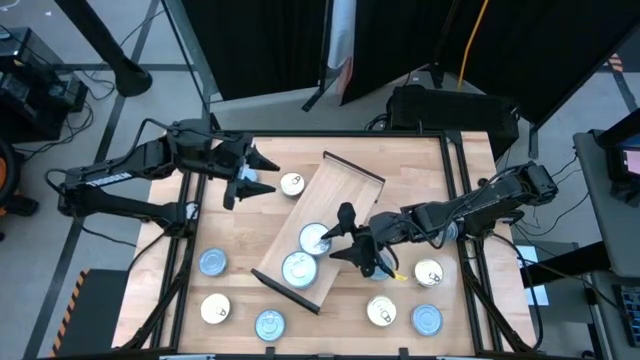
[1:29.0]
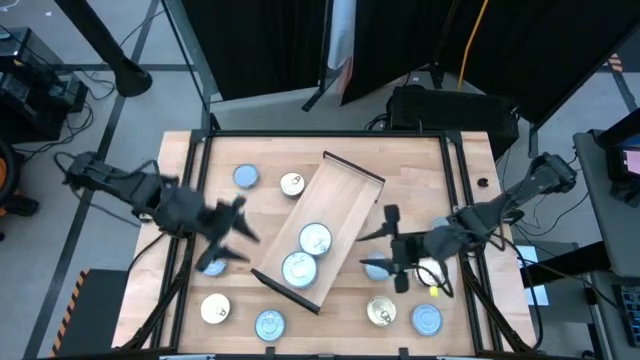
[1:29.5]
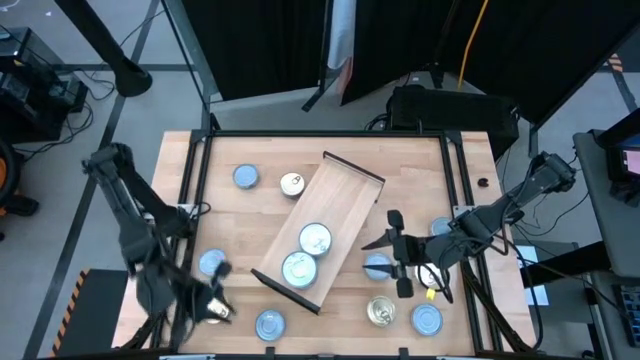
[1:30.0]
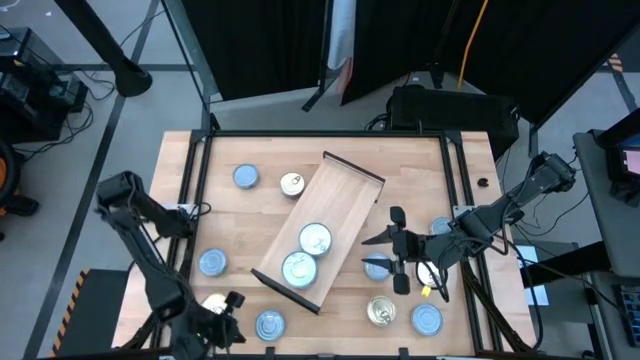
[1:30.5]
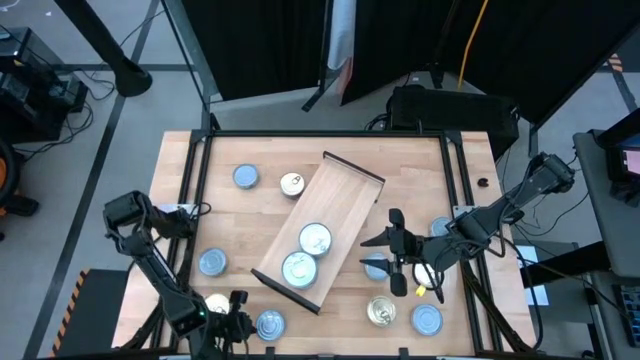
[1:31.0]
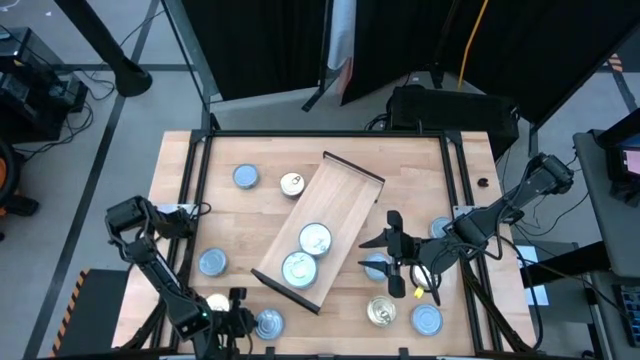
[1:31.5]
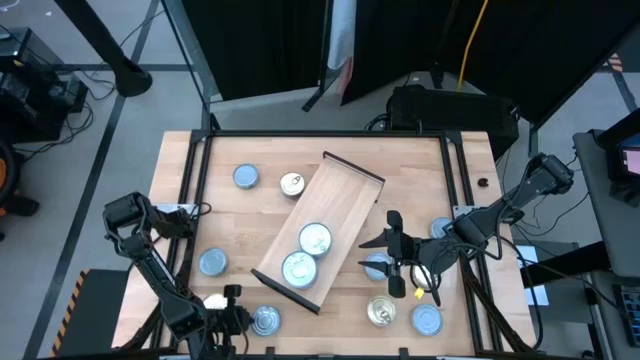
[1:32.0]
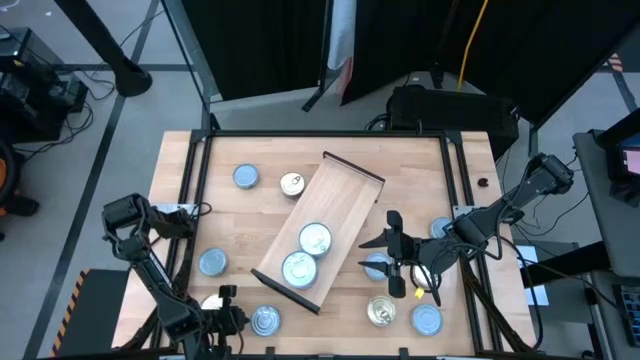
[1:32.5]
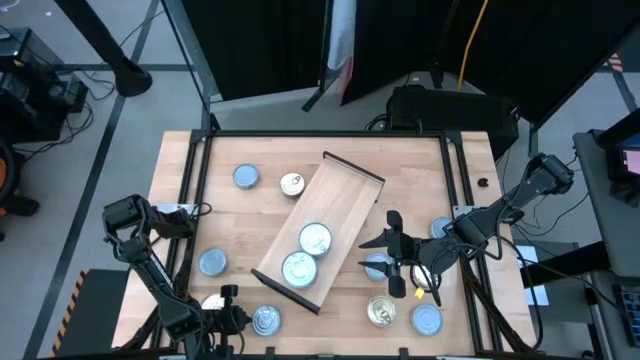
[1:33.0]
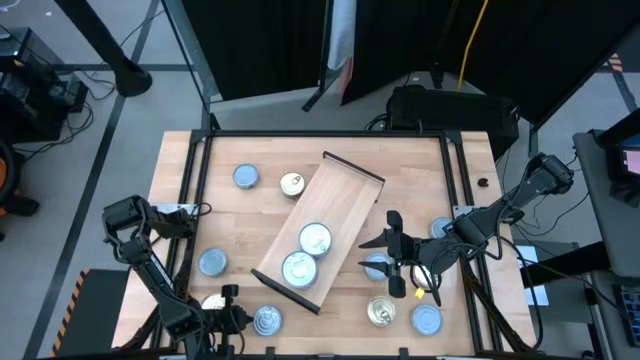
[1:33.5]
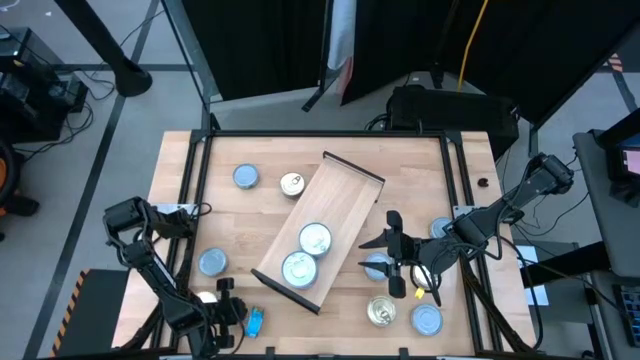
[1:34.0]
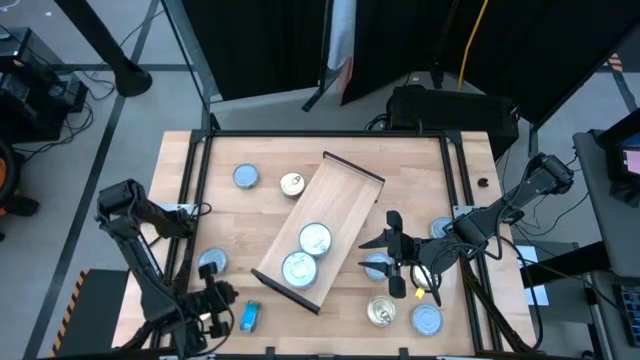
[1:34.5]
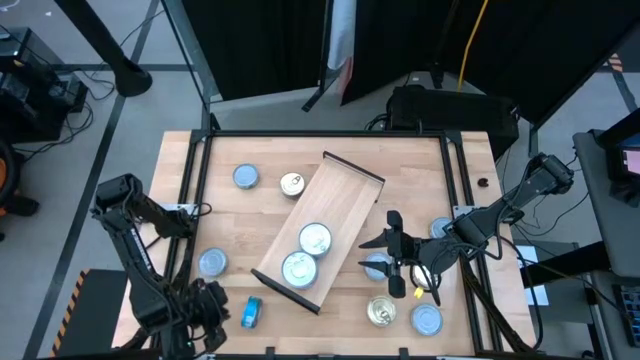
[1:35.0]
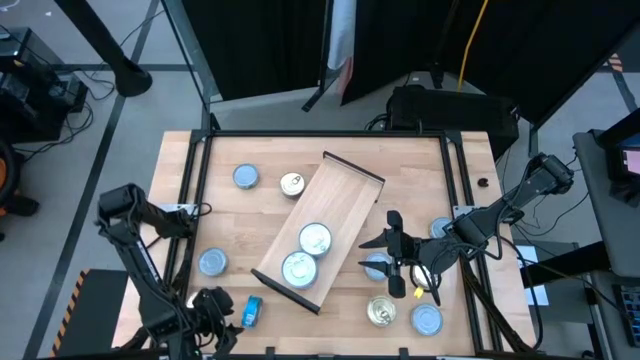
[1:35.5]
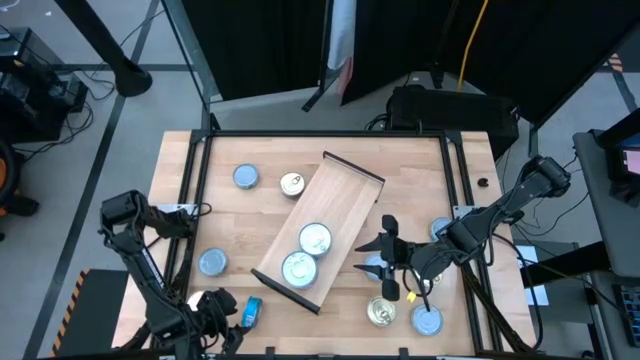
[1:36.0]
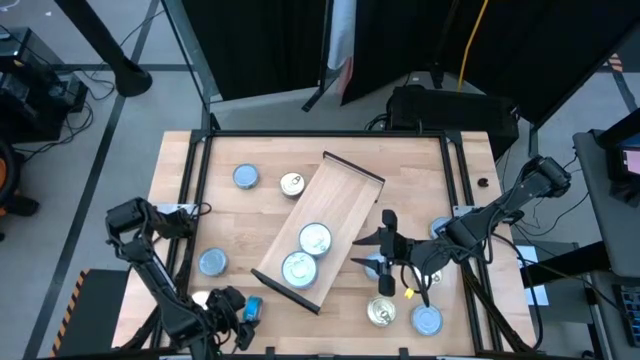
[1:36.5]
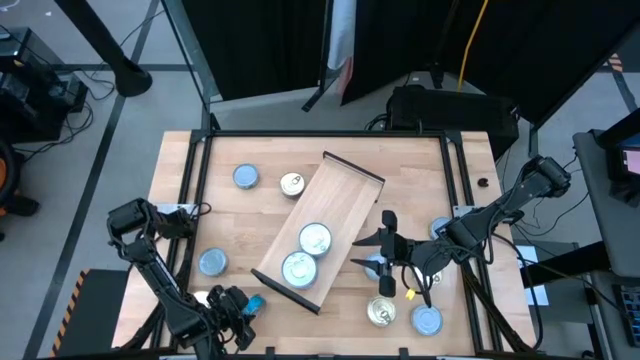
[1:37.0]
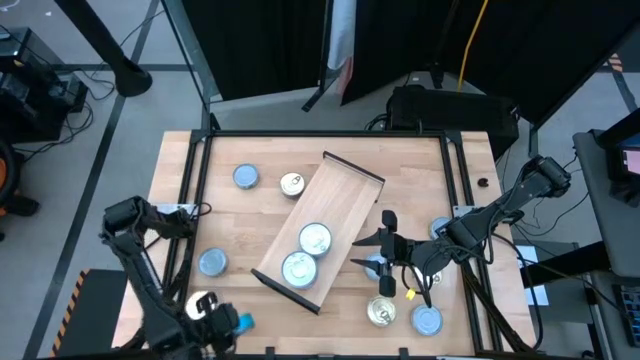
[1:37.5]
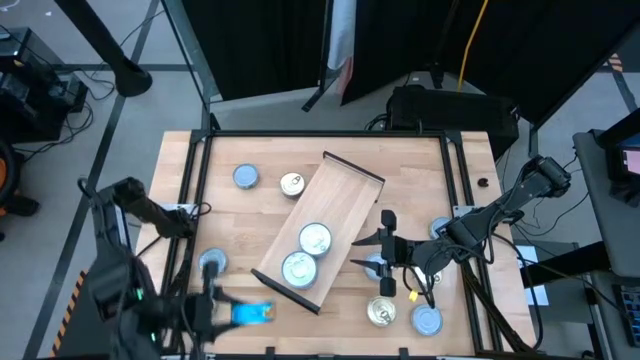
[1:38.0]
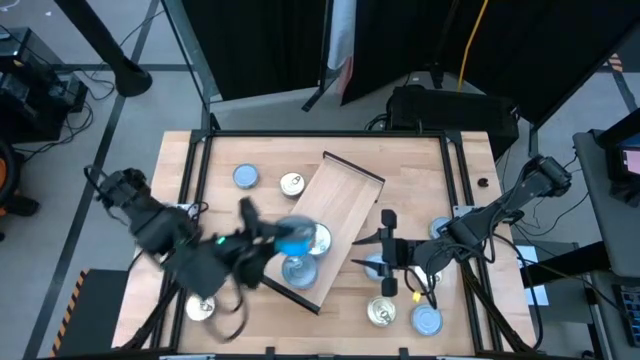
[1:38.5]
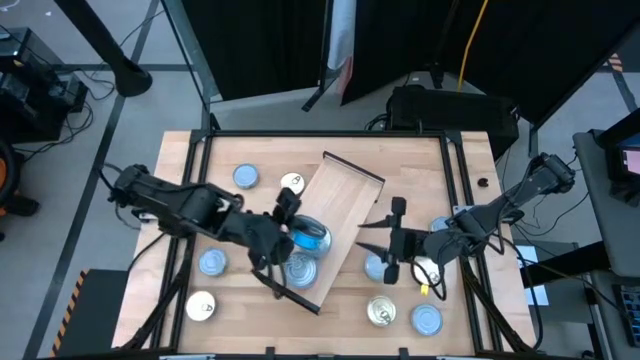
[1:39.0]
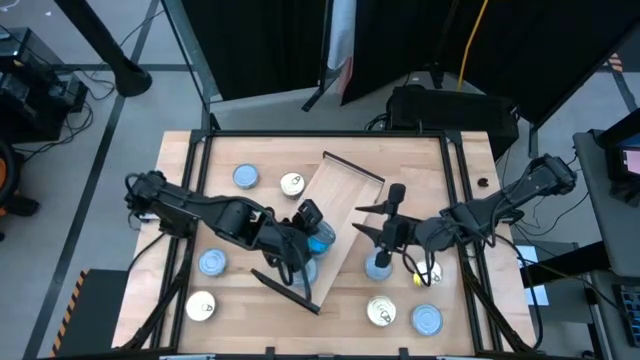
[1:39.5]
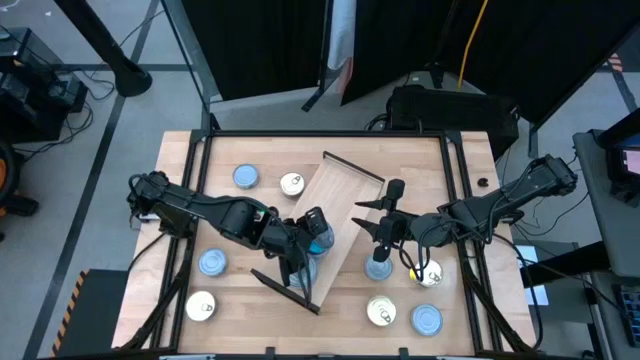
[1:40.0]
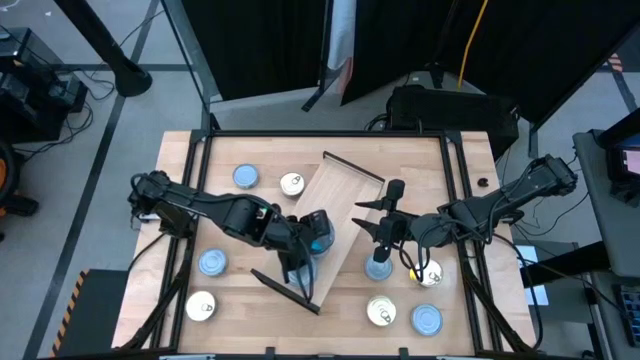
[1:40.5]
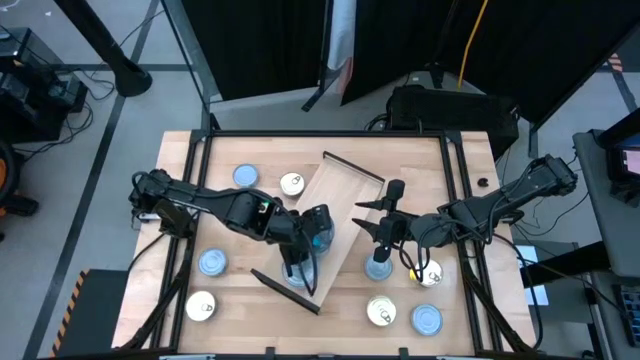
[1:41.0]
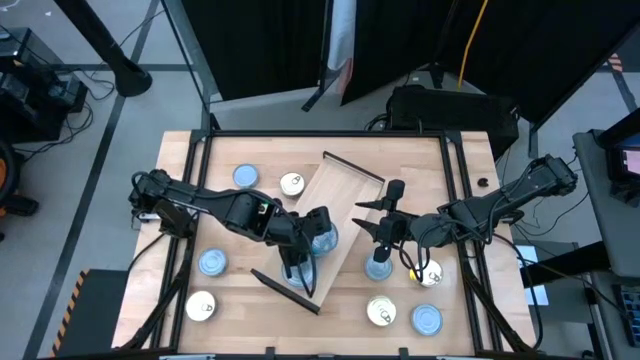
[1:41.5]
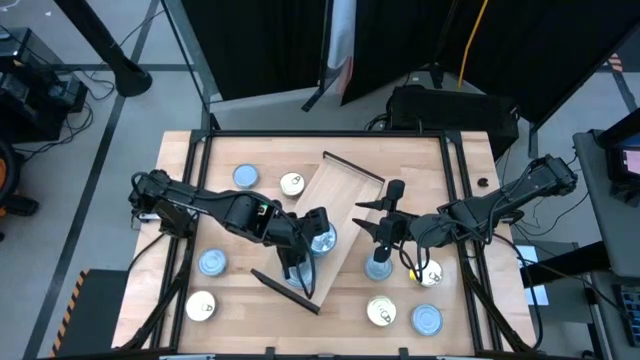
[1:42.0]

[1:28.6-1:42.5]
Task: Stack canned seafood by type on shelf
Stack the light blue tuna can on top of the other light blue tuna can

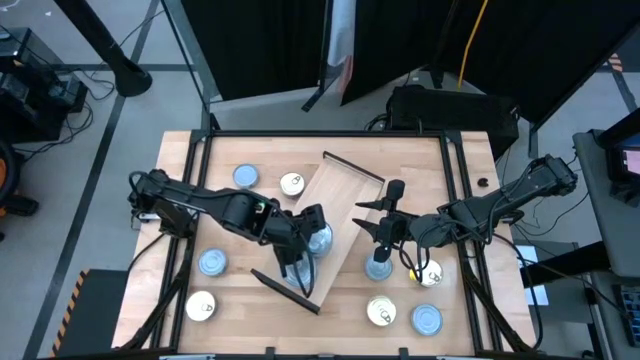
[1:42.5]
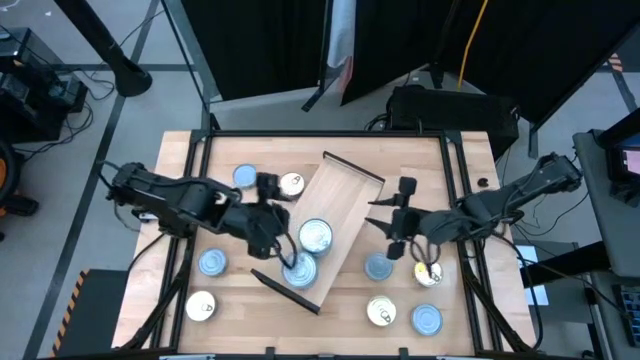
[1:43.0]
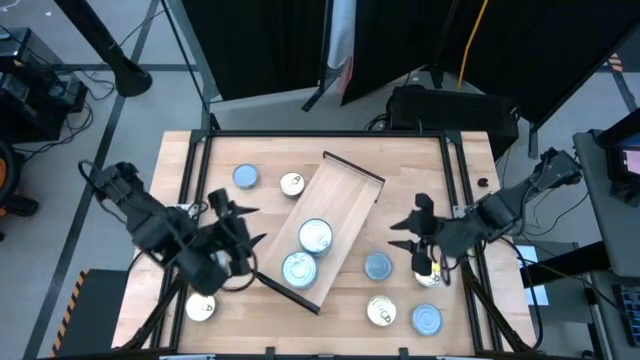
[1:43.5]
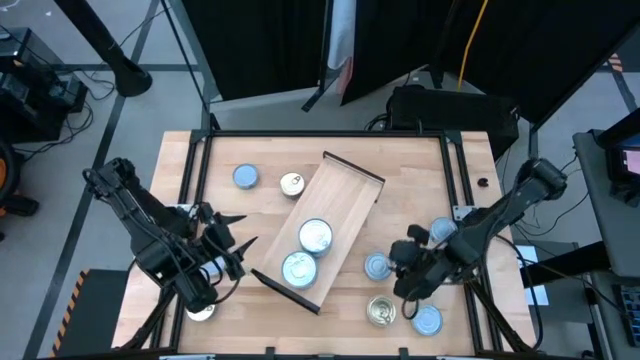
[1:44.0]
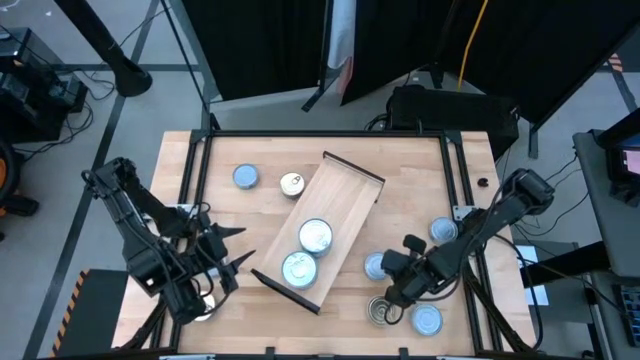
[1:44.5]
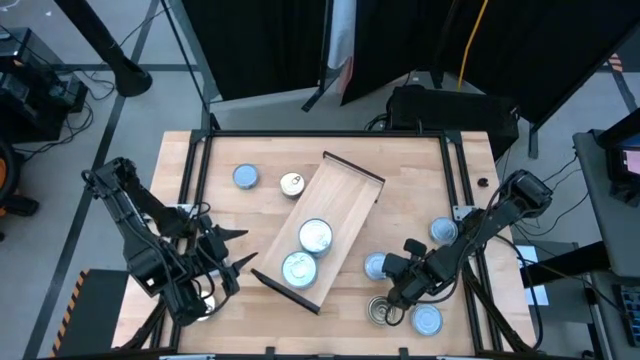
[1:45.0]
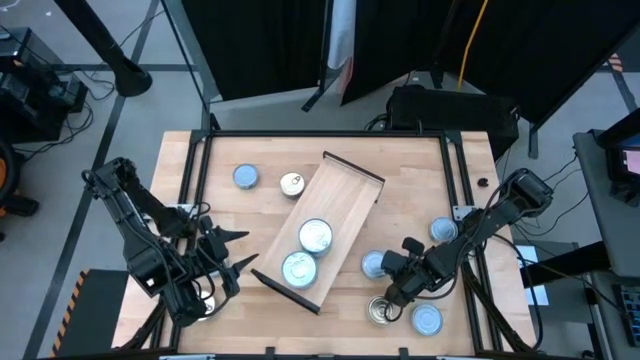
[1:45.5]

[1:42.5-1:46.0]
Put the green tuna can on the shelf

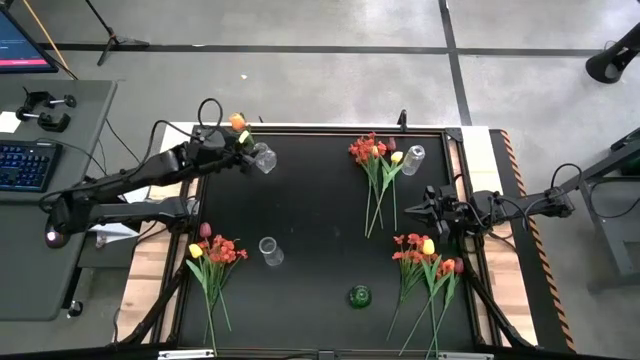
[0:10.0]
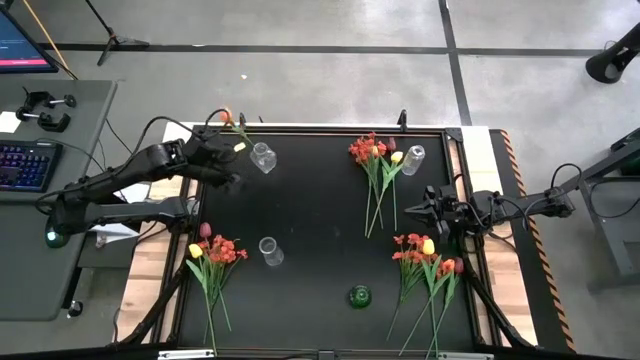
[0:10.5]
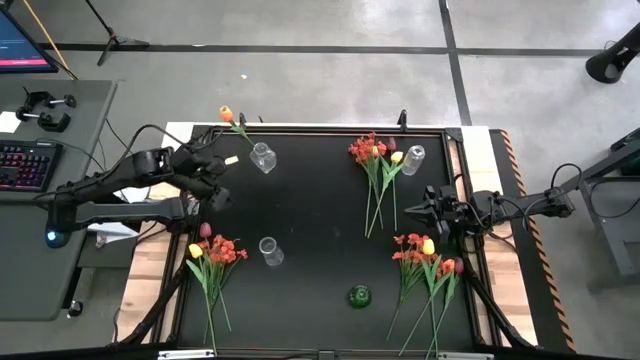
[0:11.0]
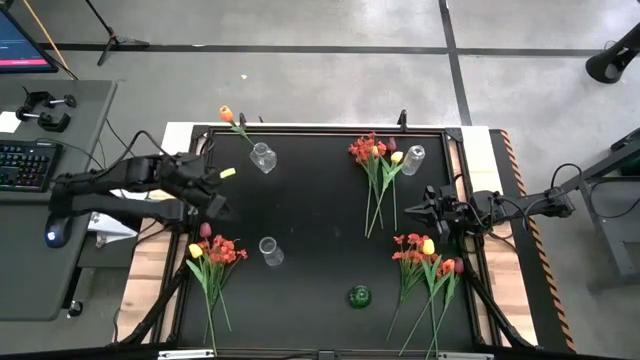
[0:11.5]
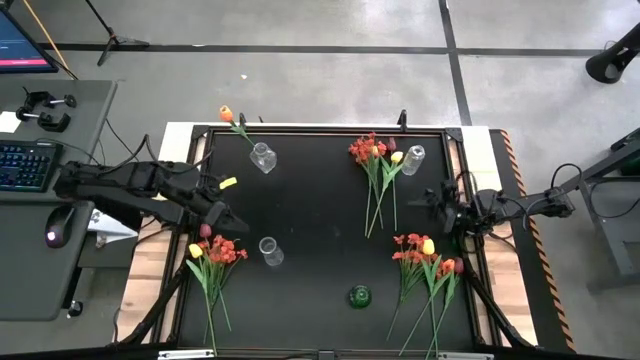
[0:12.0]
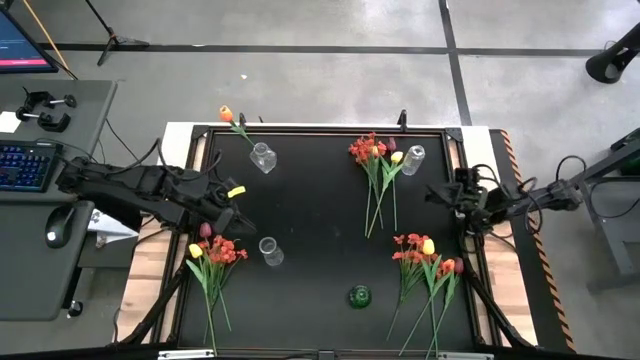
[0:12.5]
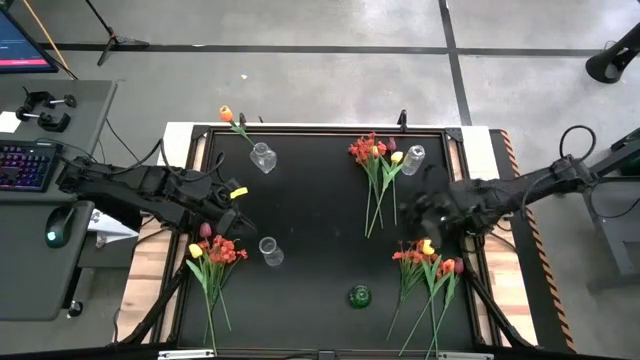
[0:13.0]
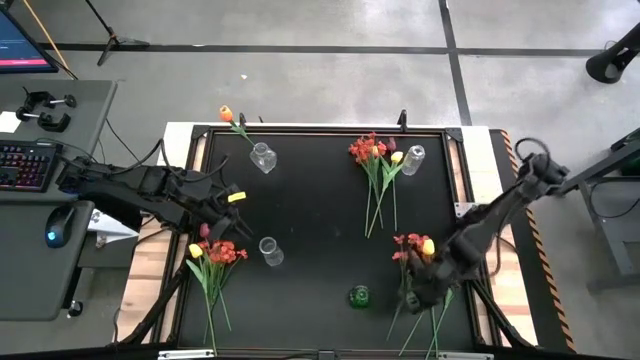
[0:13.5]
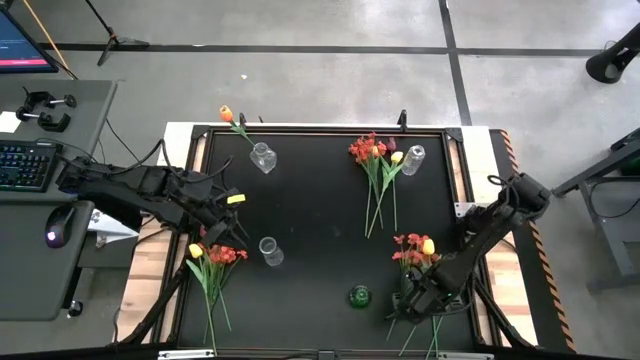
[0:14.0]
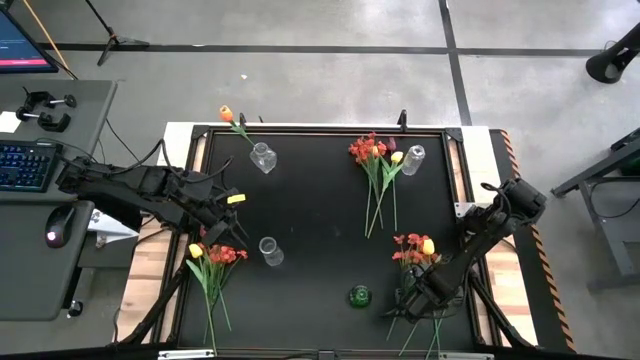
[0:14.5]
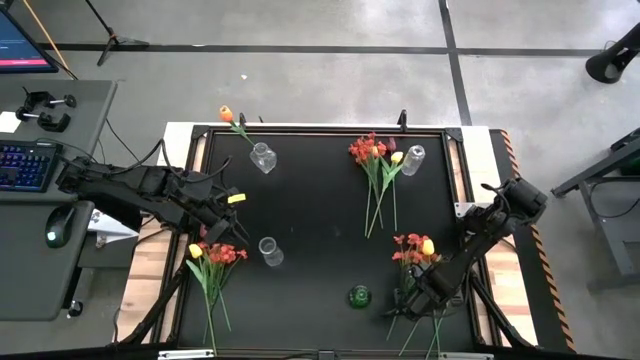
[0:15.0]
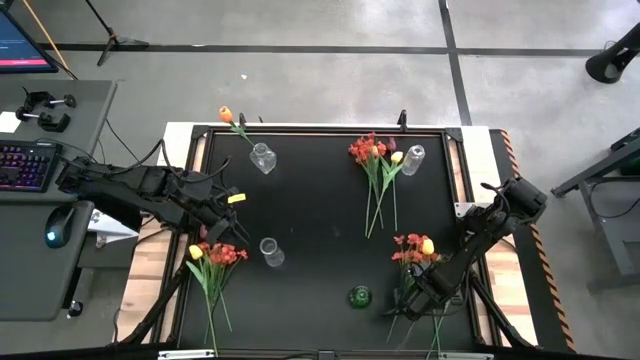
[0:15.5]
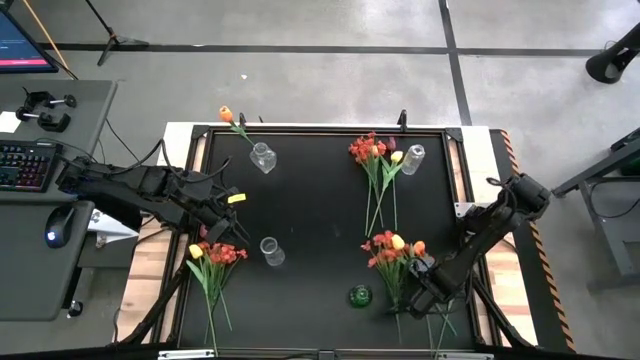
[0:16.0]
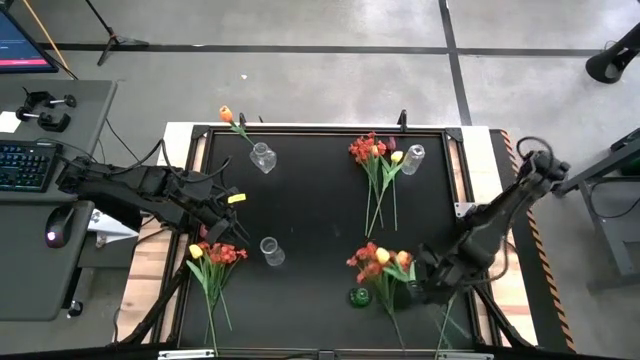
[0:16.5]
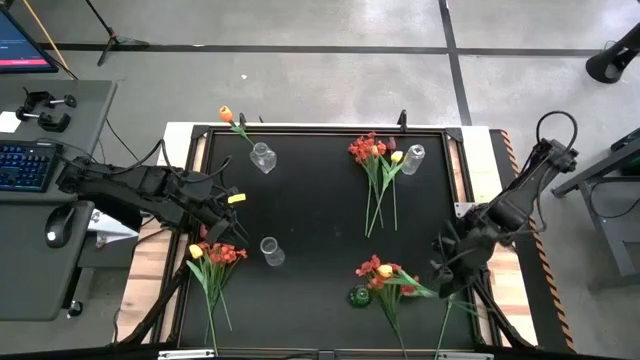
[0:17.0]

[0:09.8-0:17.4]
Task: Sort flowers into vase by color
Put the bottom orange flower into the top left transparent vase
